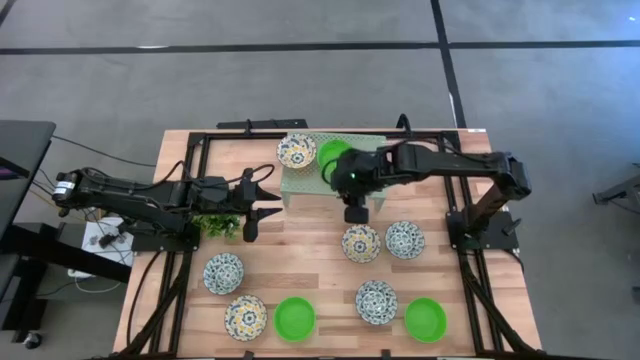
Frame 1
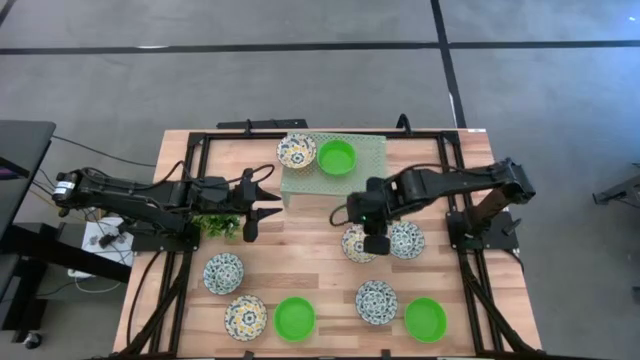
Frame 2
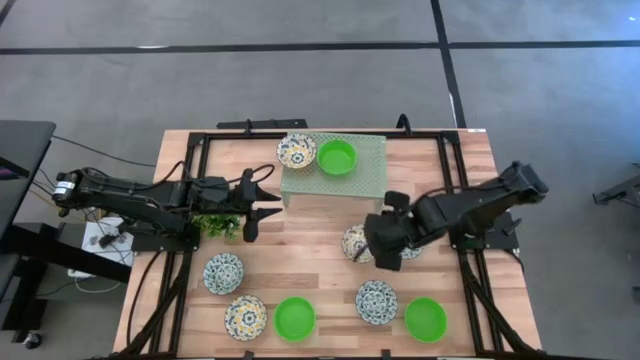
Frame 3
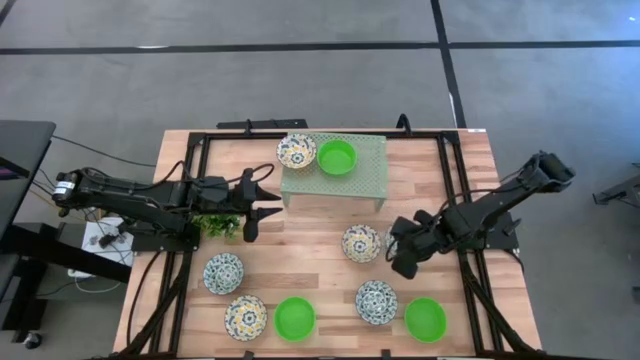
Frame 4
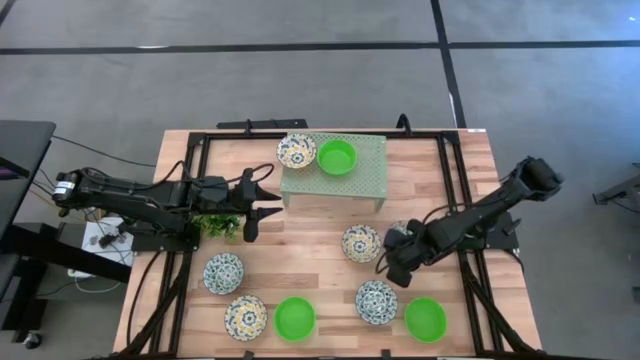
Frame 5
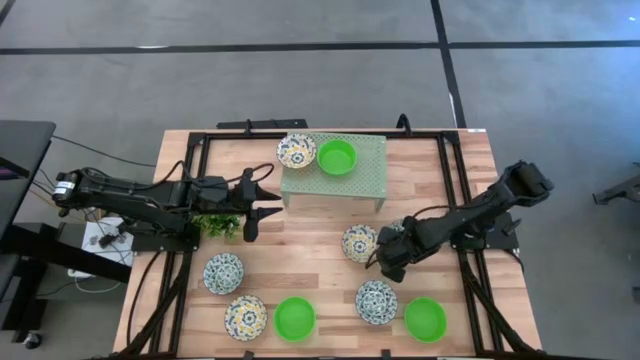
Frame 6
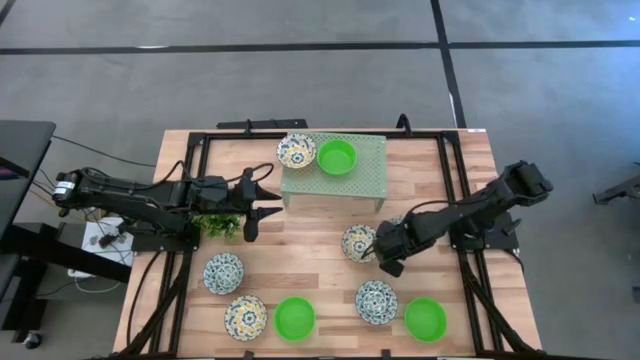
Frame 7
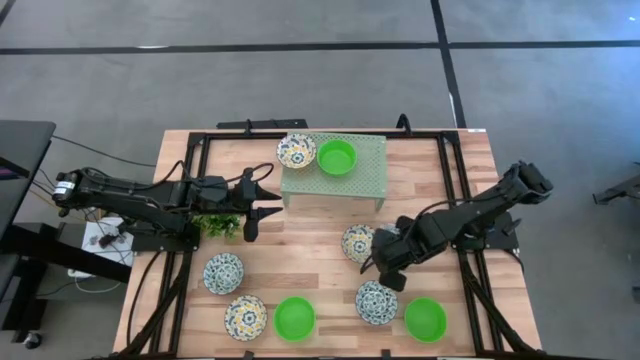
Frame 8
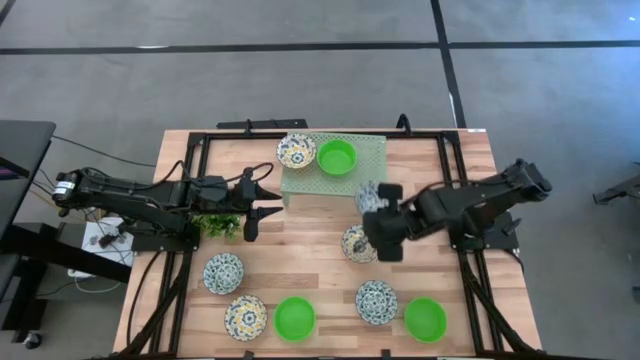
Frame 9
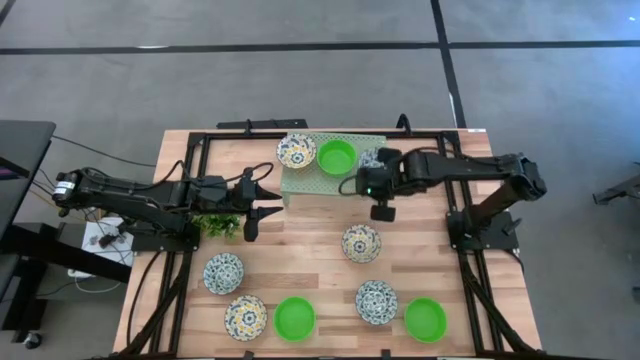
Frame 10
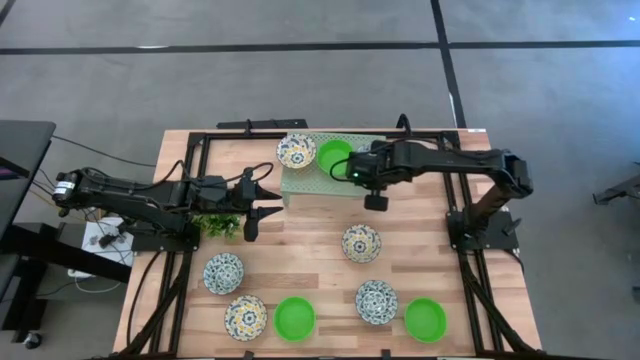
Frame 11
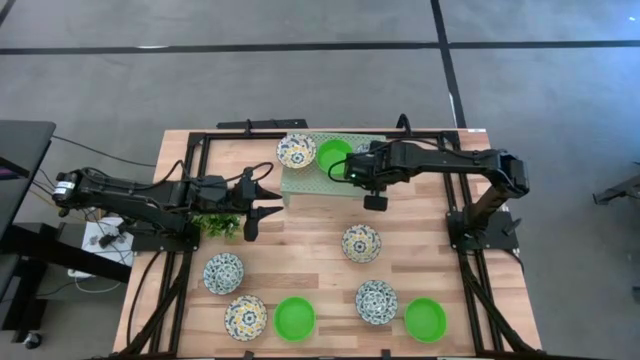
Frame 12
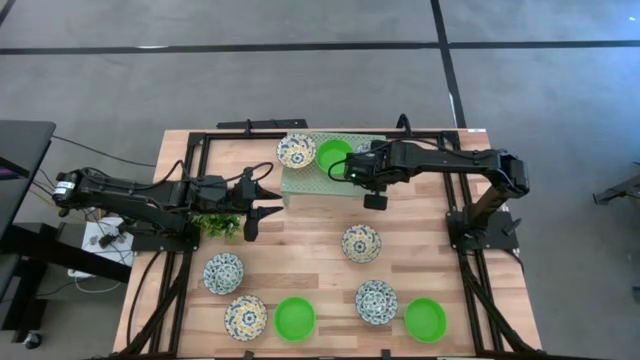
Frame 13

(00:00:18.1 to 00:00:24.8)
Task: Pick & Place Mini bowls
Put the top blue bowl on the shelf

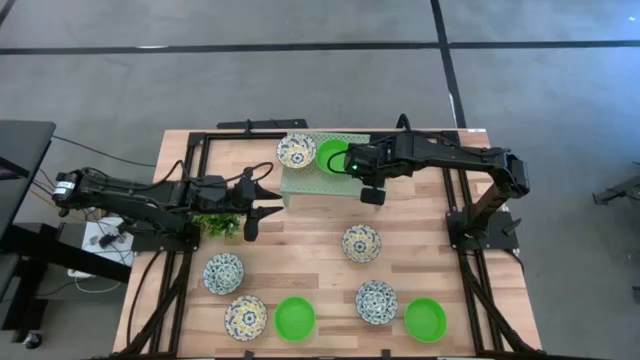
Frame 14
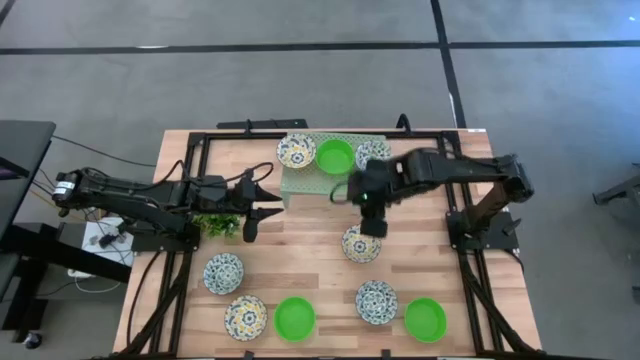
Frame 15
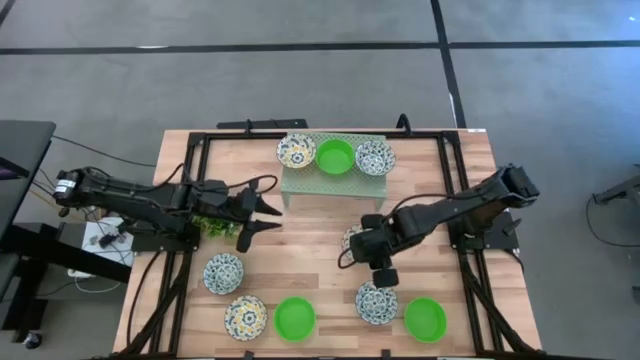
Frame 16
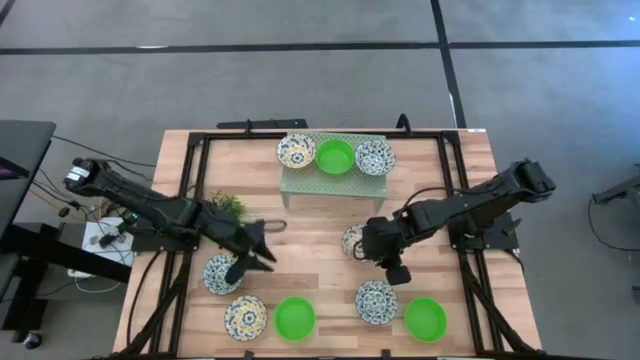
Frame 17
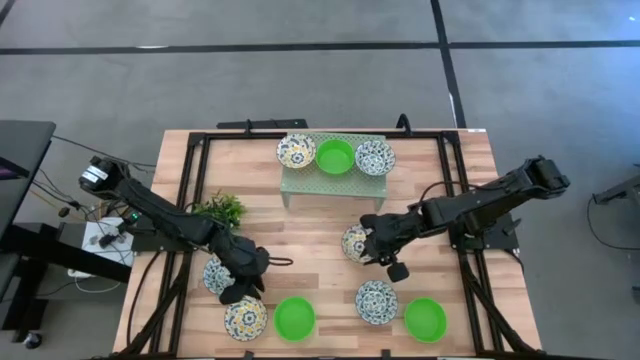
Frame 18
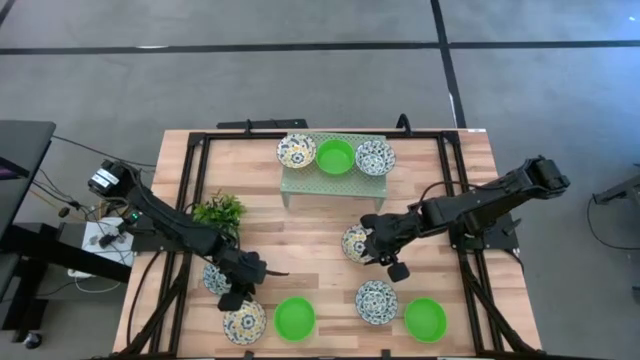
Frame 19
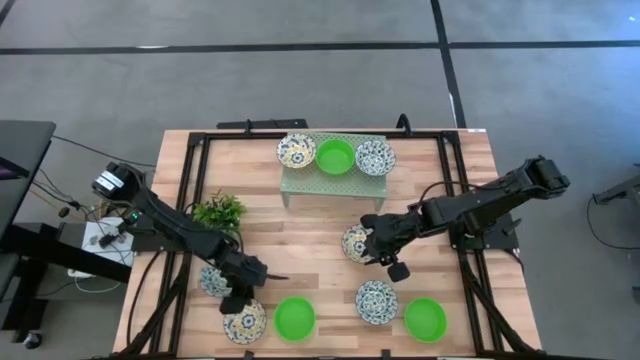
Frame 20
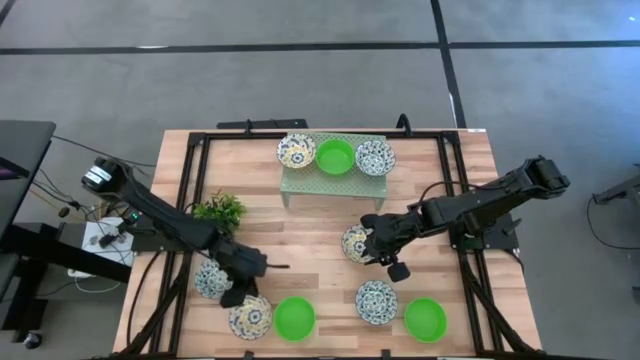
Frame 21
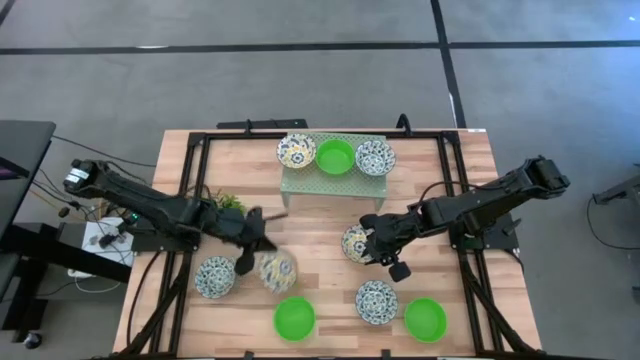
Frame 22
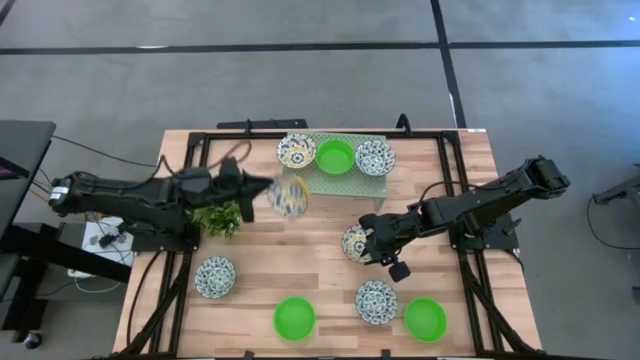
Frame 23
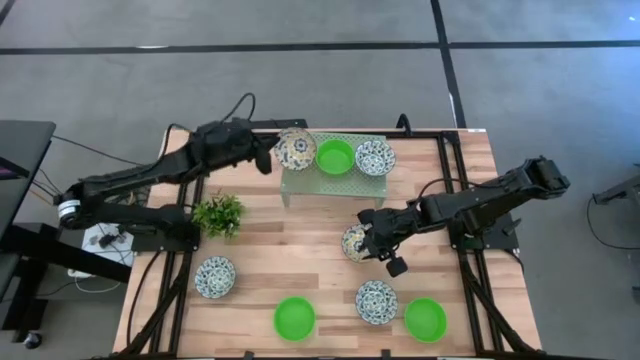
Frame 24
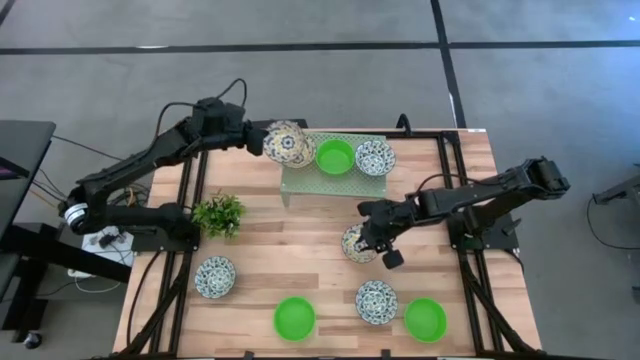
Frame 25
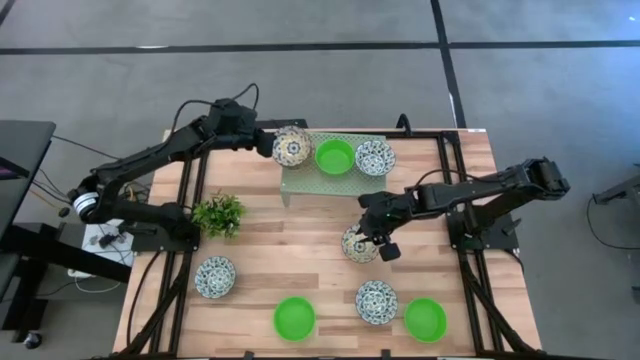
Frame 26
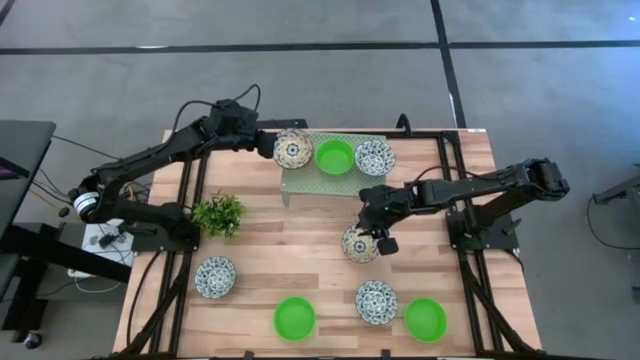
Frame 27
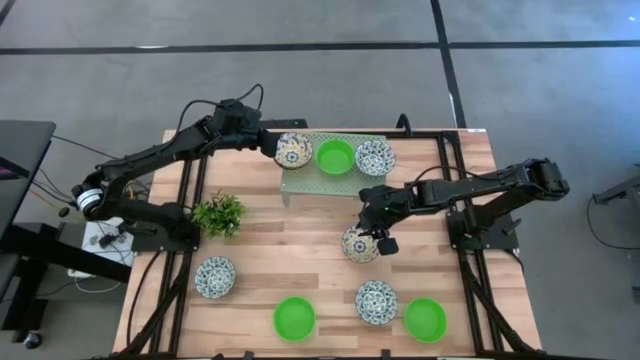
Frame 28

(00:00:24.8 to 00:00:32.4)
Stack the bottom yellow bowl on the yellow bowl on the shelf

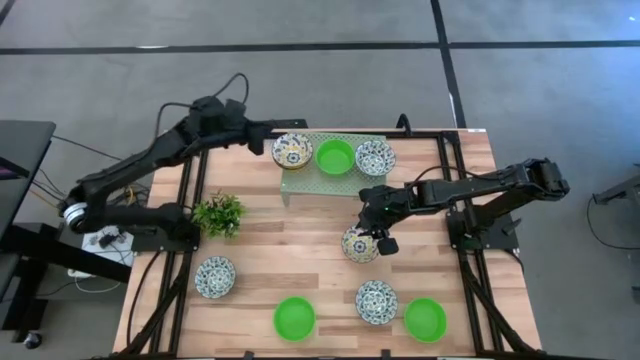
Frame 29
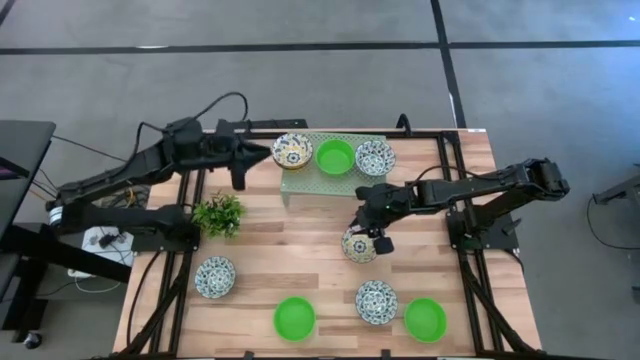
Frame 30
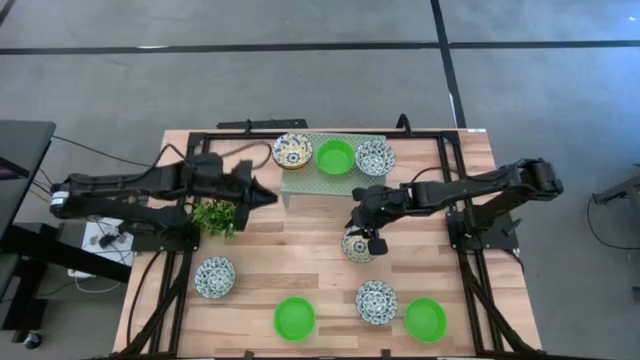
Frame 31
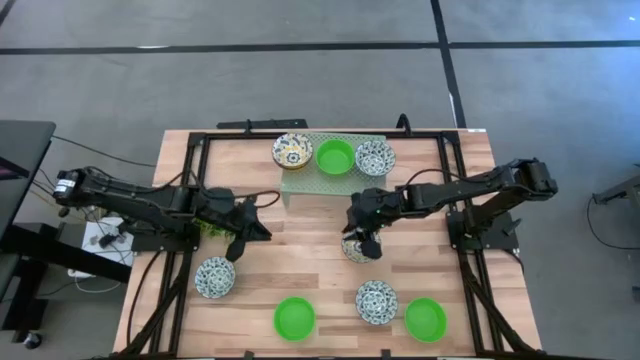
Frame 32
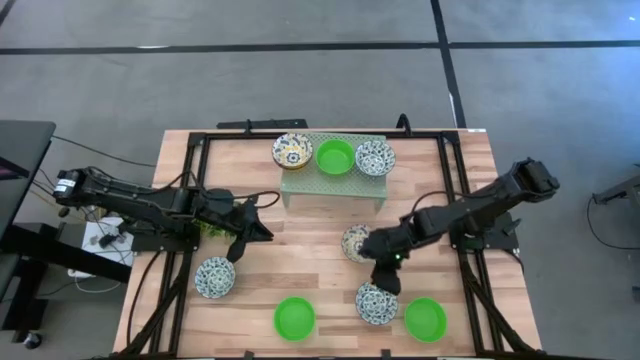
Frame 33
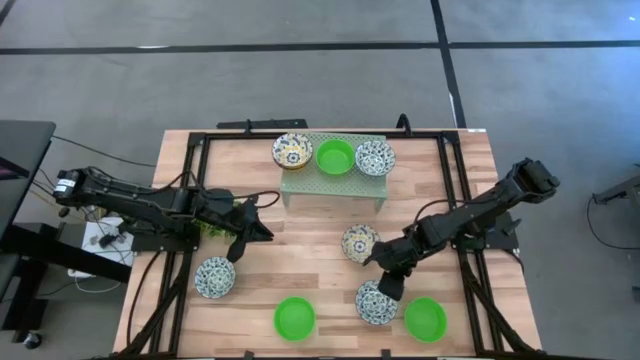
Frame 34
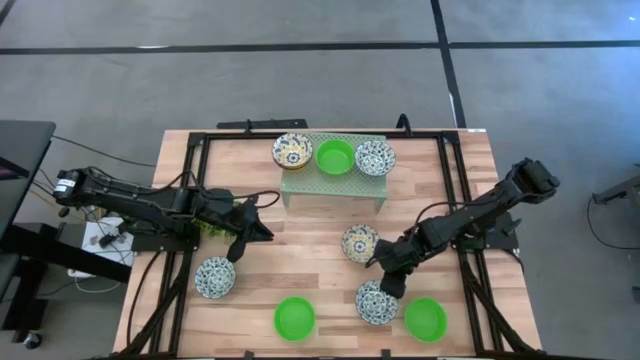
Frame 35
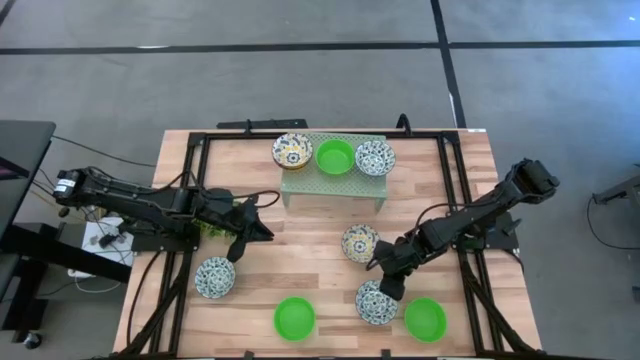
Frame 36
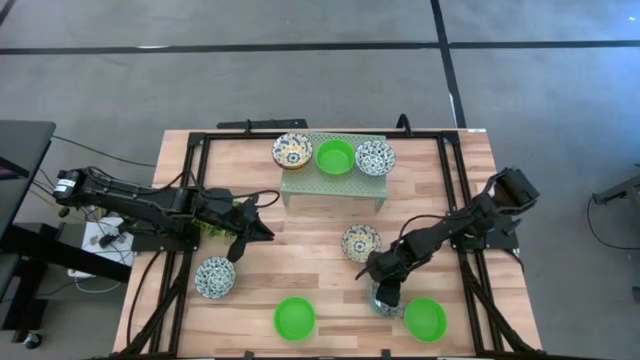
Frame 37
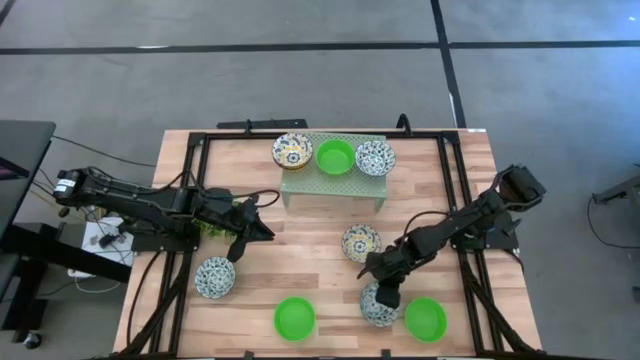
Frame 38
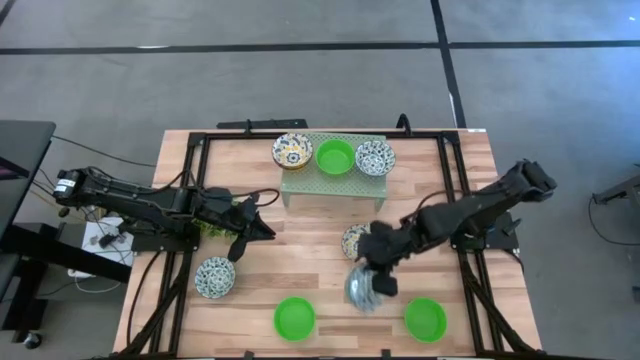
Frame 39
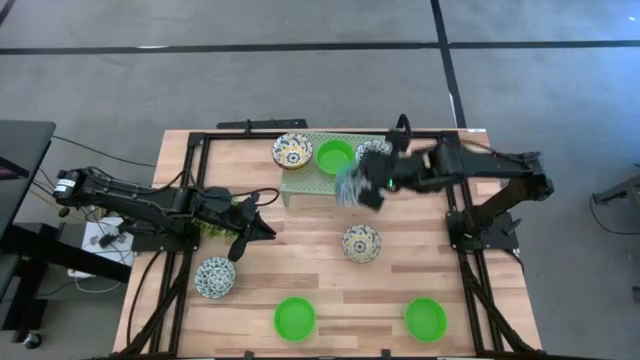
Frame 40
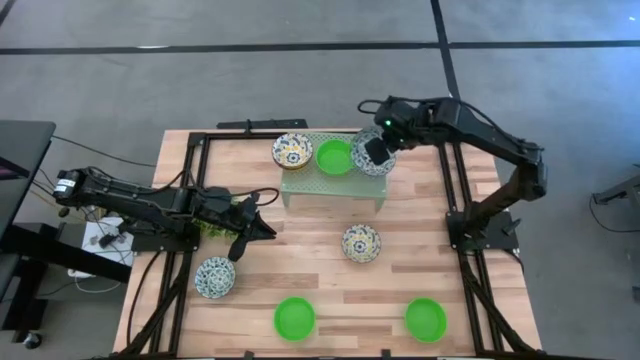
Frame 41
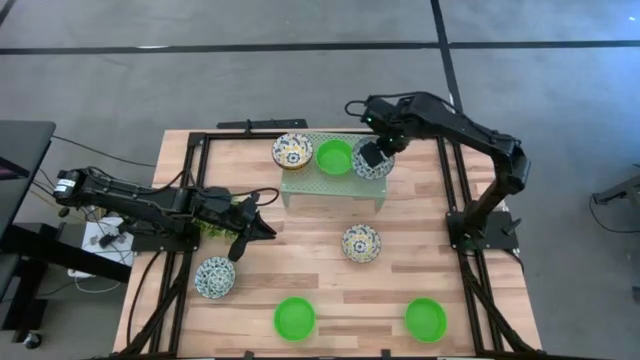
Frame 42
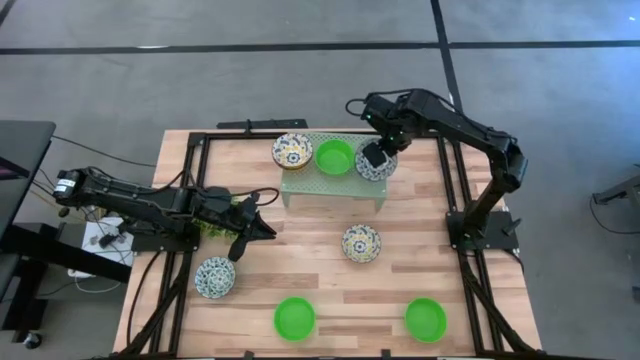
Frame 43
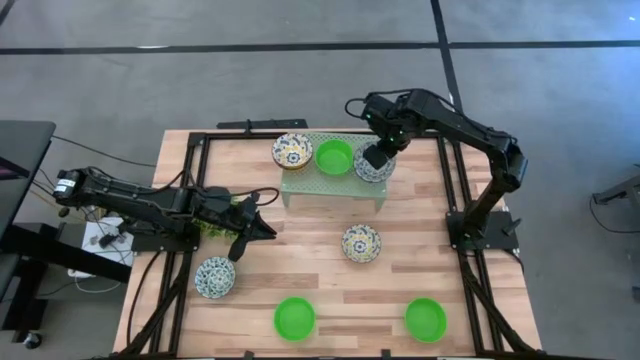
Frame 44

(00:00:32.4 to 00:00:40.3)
Stack the bottom blue bowl on the blue bowl on the shelf
